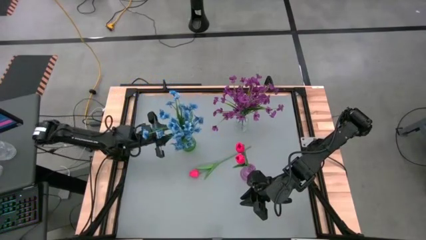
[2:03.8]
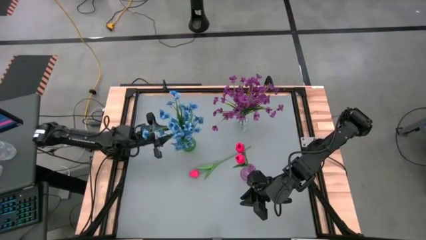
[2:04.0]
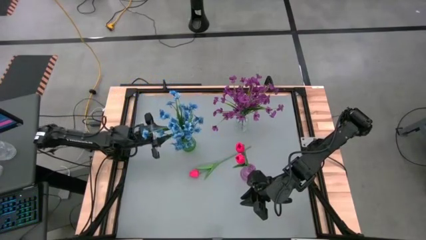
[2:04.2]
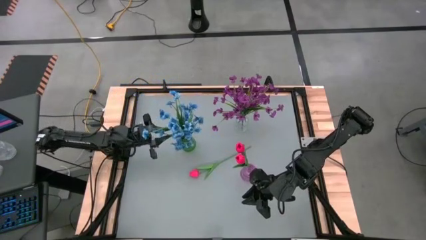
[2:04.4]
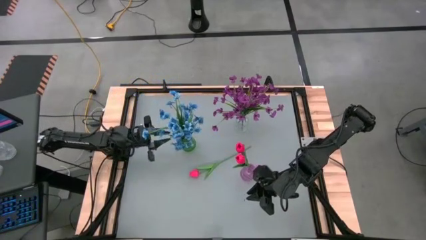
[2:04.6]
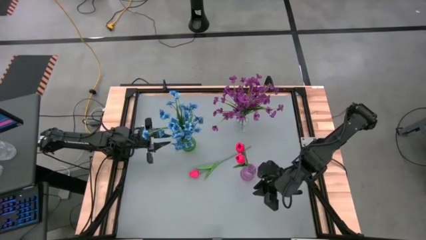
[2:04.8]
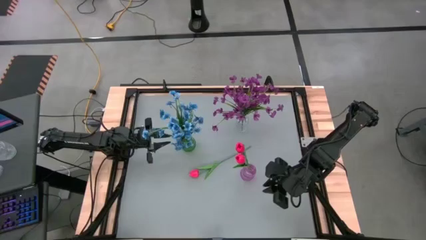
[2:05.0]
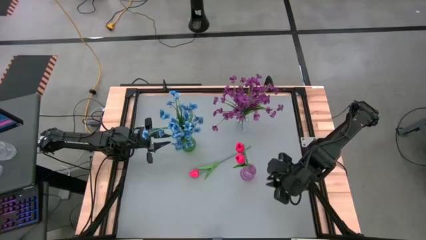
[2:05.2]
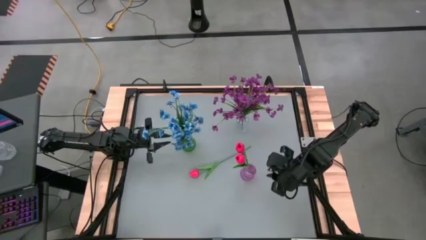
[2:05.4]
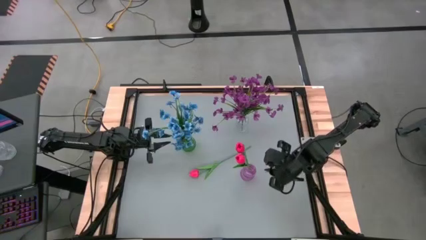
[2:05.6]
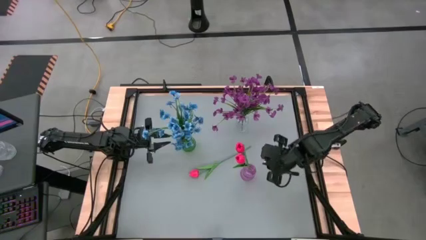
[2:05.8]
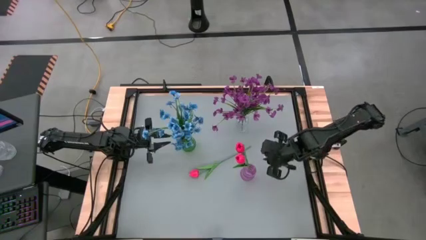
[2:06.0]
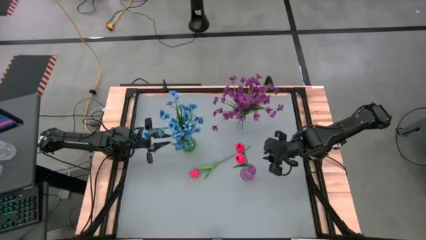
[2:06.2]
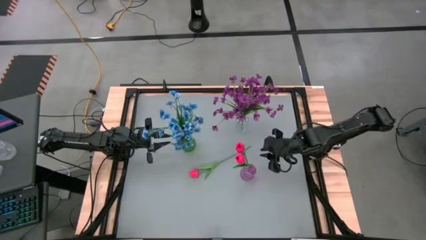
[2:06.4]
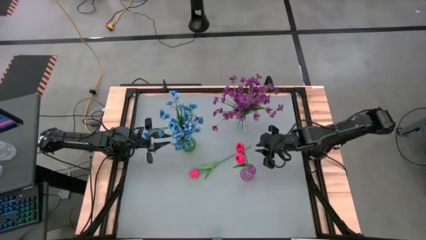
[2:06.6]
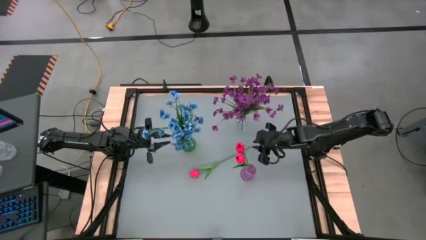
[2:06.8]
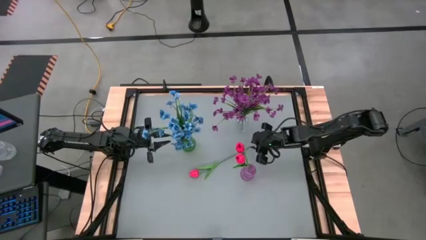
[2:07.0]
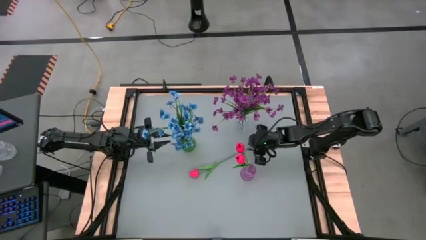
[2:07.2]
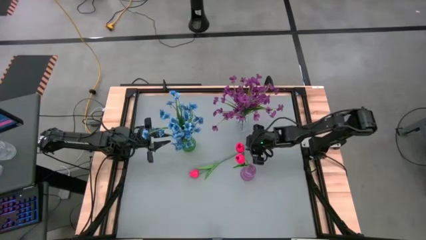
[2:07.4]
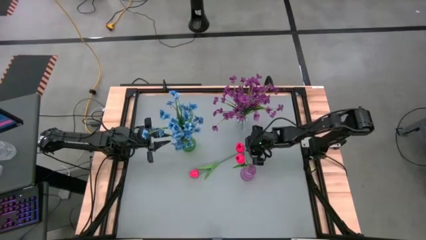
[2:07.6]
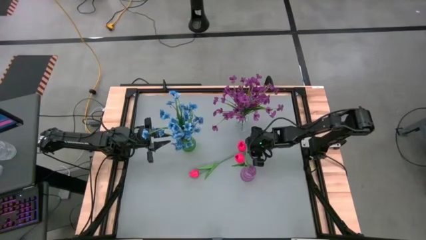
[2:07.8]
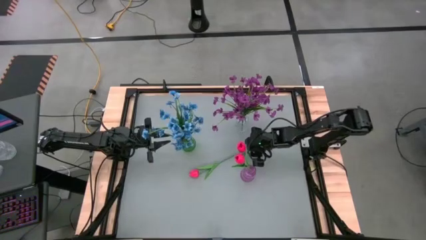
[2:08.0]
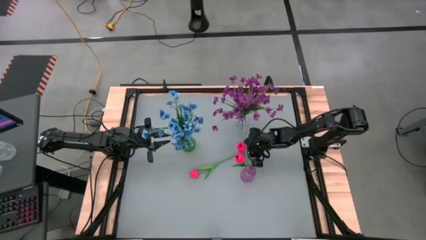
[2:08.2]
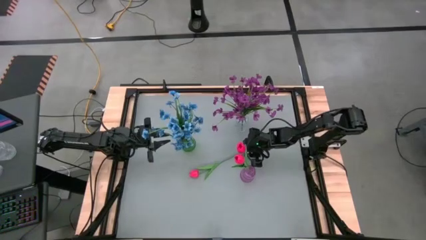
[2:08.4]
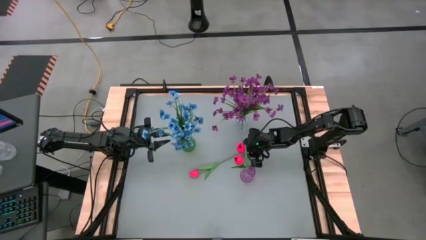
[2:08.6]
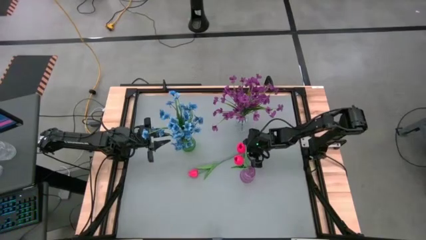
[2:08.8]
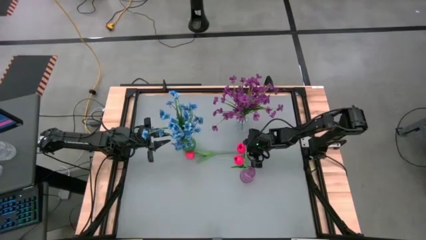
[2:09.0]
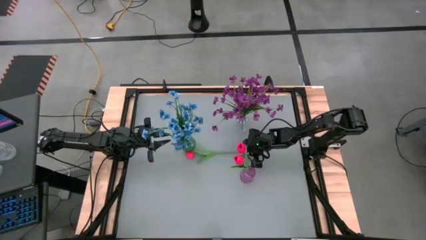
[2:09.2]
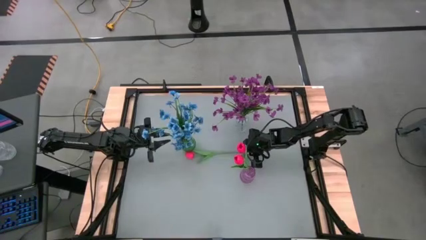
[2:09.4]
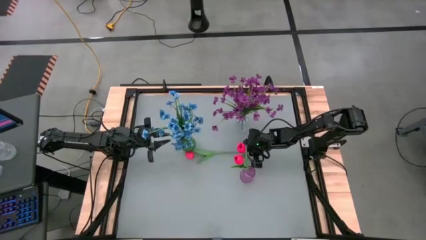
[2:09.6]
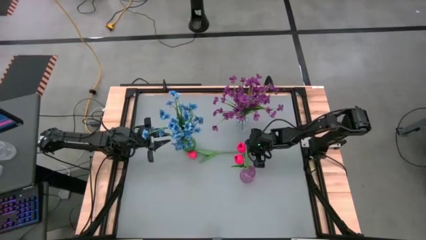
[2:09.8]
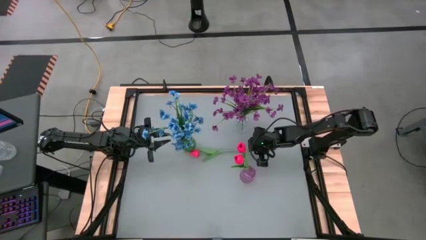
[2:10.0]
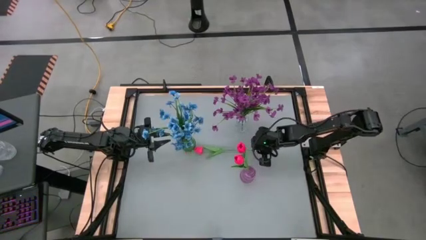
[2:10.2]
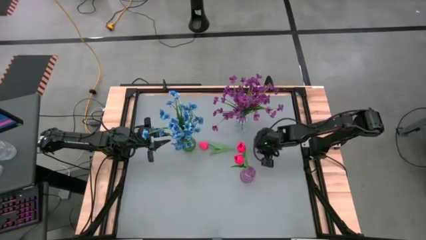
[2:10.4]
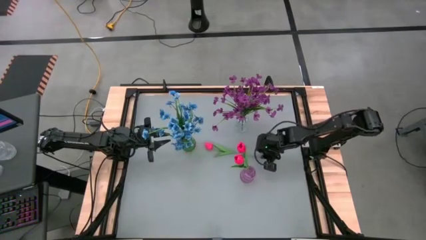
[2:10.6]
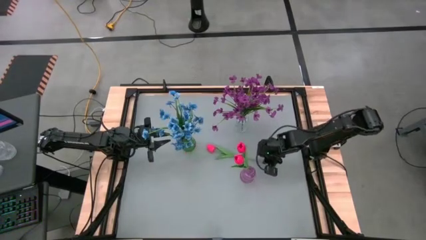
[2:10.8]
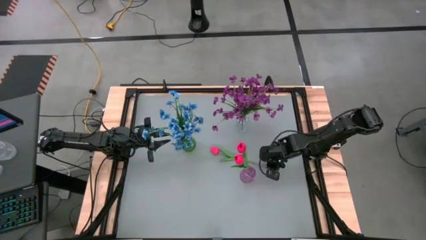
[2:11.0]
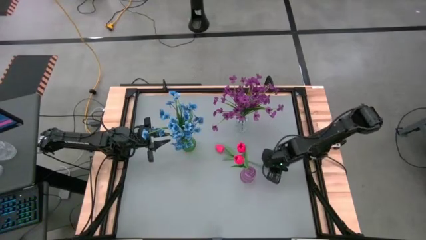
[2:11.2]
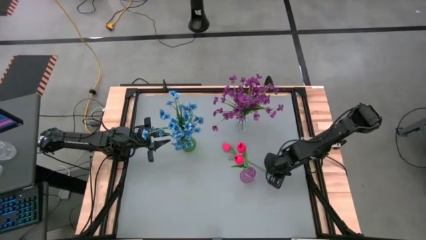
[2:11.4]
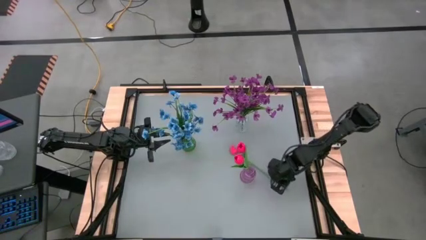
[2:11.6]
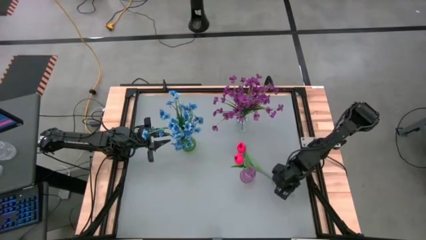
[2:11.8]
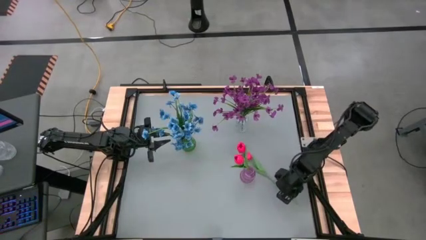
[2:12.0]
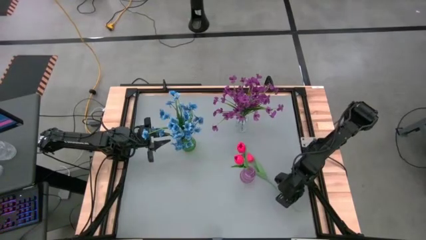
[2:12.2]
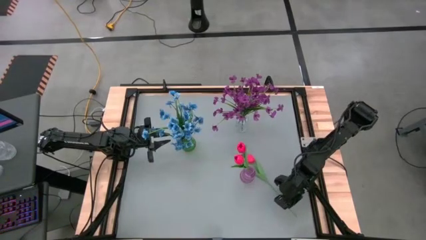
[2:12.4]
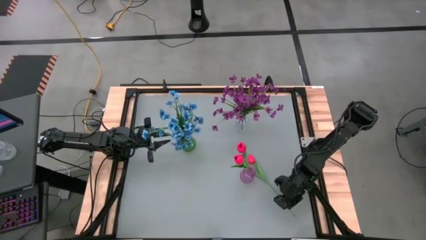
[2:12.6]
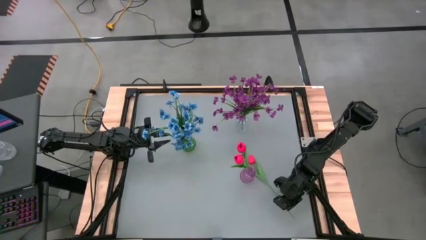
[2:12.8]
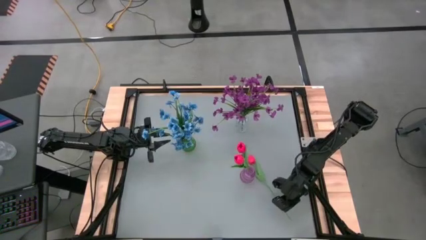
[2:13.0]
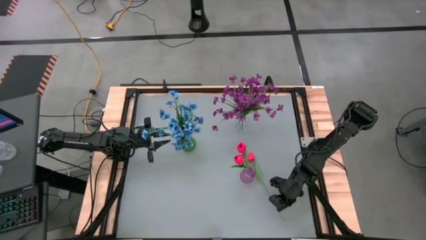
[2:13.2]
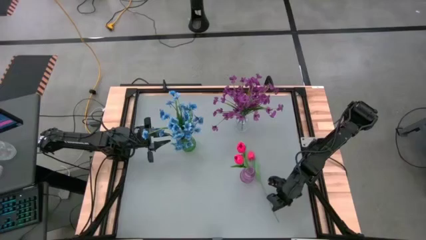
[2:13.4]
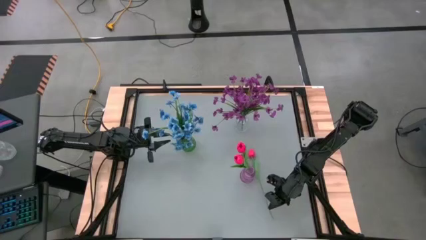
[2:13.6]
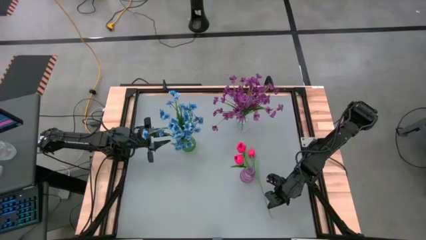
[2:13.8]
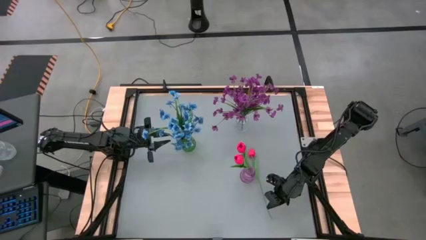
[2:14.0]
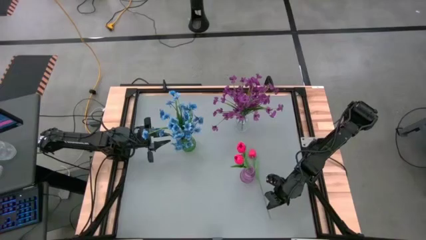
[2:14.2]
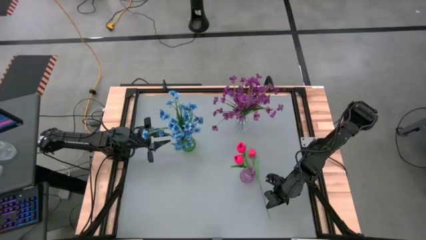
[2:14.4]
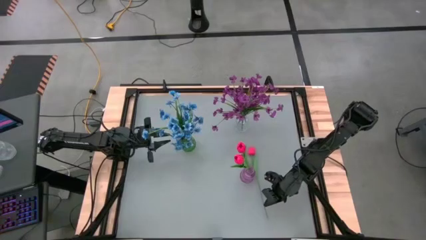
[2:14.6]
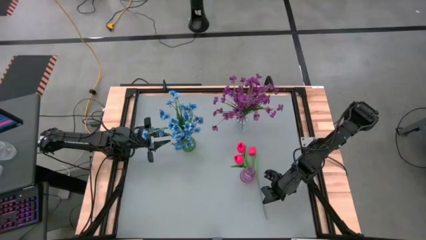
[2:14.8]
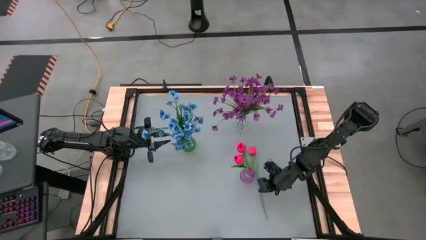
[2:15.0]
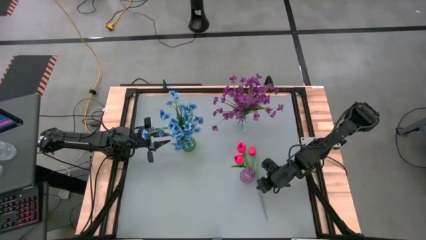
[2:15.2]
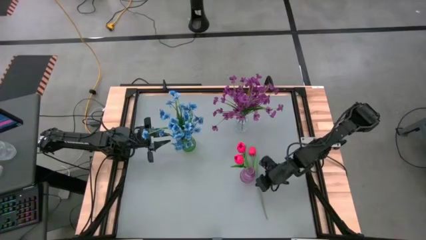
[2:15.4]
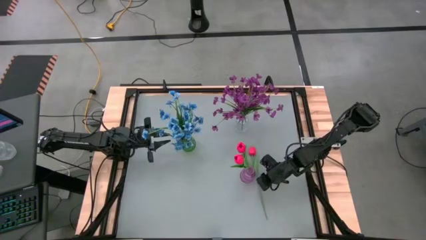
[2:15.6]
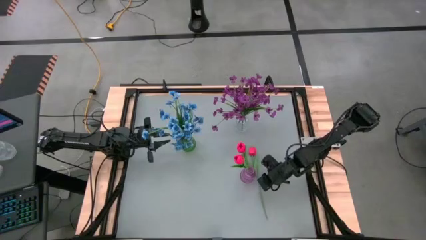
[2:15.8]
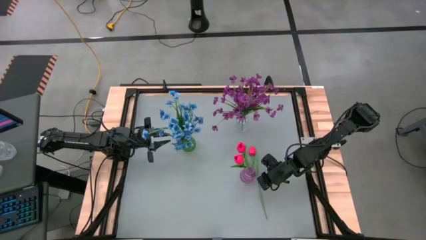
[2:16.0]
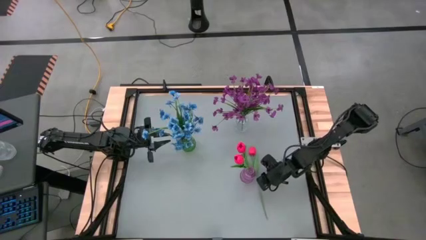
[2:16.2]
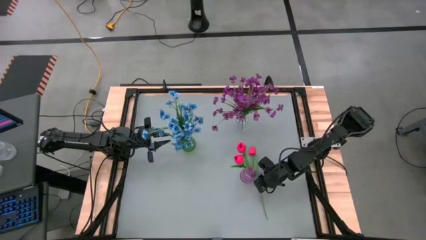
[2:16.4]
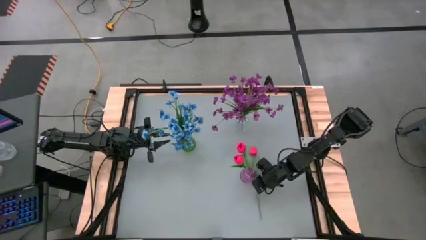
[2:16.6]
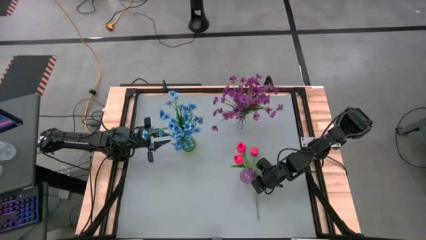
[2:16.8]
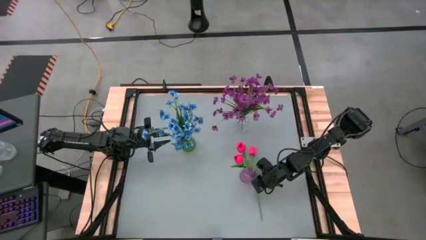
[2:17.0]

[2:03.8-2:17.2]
Task: Sort flowers into vase by color
Put the pink tulip into the purple flower vase

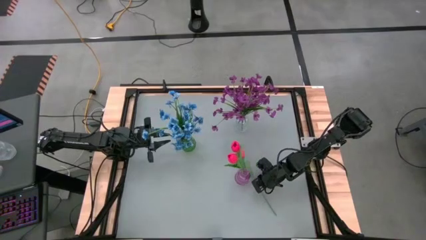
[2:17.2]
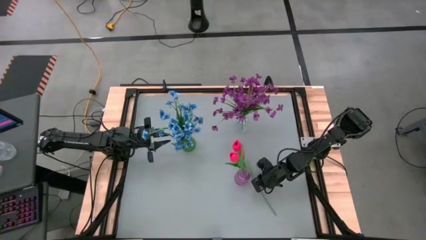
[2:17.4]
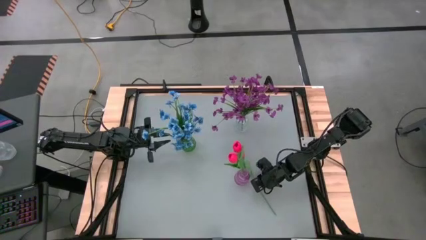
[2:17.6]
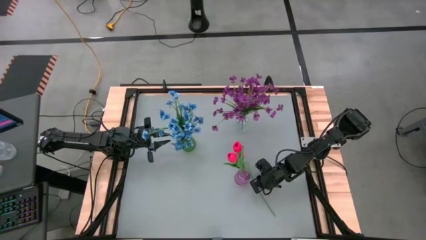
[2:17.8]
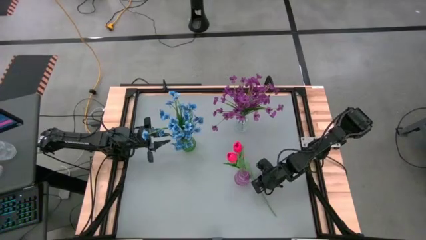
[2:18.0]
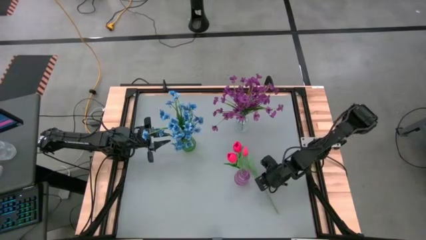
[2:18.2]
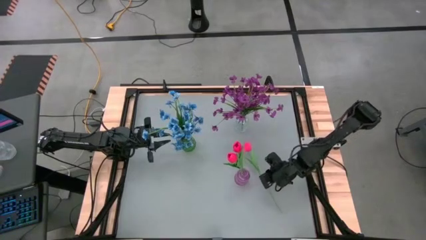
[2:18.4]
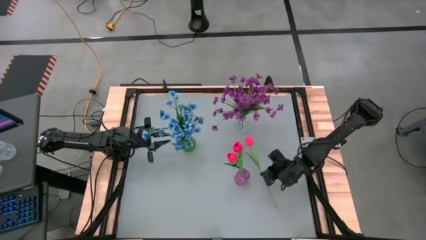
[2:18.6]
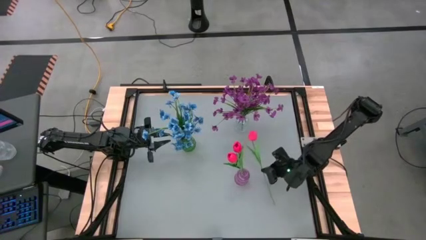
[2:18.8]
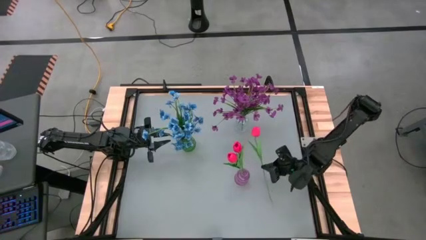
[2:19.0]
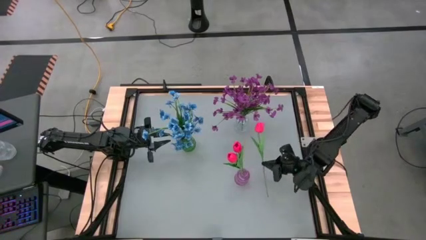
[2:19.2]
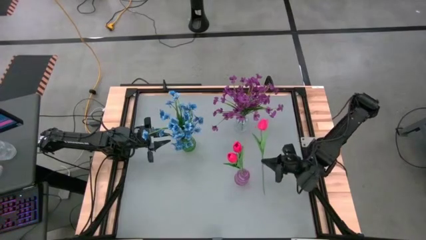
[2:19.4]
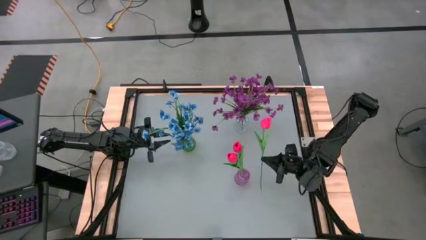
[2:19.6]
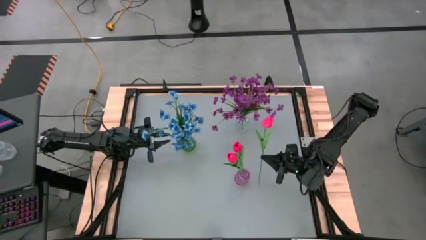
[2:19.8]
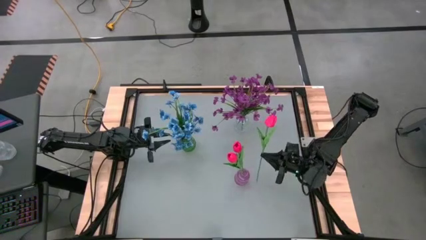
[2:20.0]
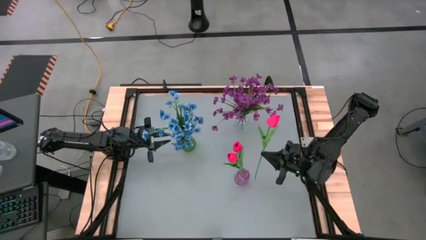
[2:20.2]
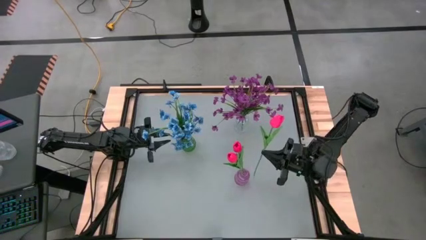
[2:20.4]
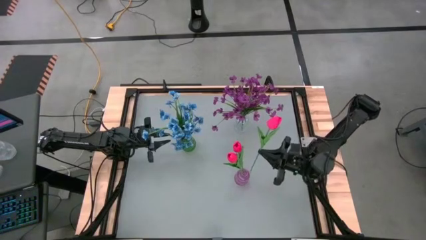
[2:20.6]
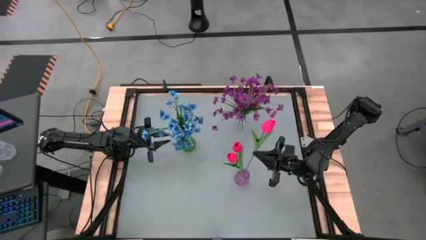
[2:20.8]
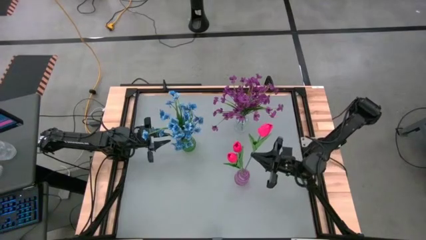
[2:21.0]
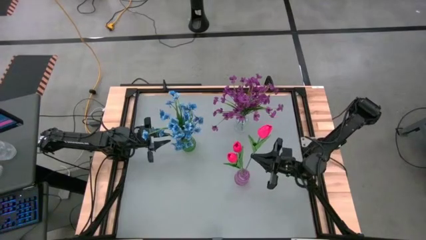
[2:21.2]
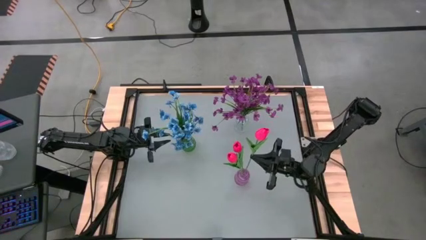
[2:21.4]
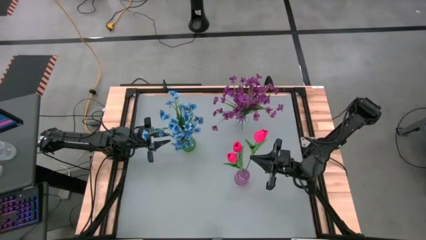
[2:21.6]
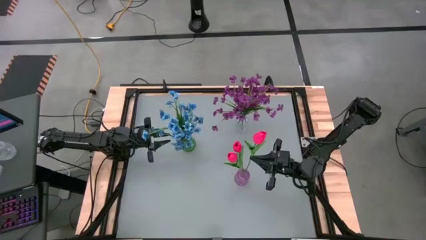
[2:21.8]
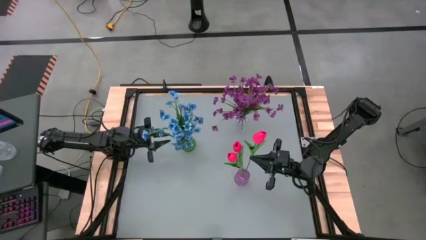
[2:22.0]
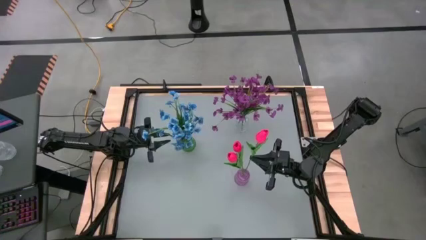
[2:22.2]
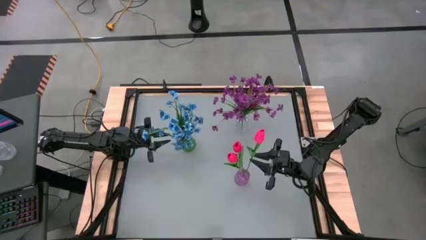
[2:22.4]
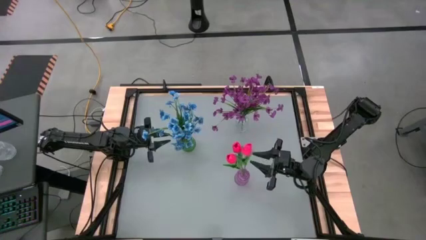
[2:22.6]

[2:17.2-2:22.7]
Put the pink tulip into the purple flower vase
